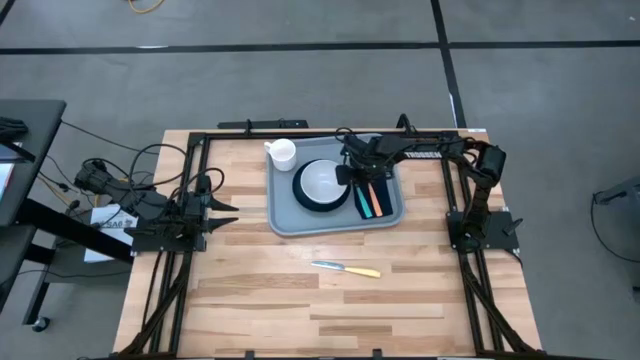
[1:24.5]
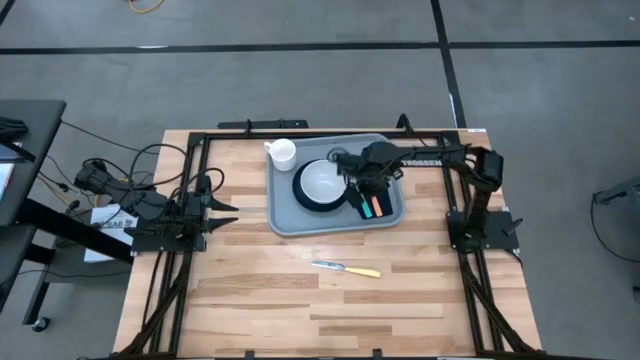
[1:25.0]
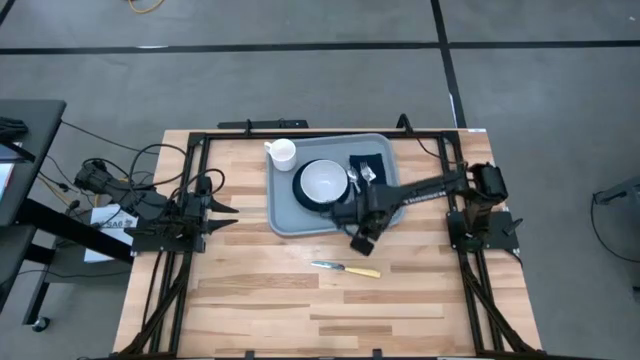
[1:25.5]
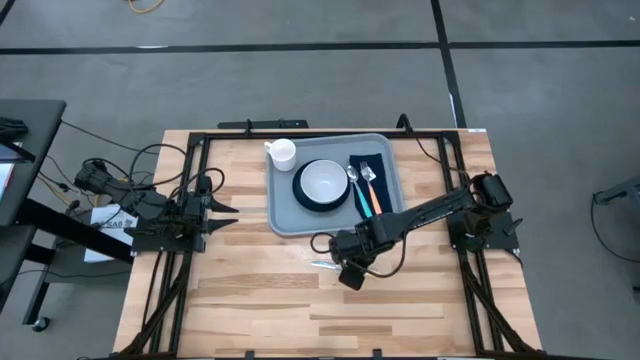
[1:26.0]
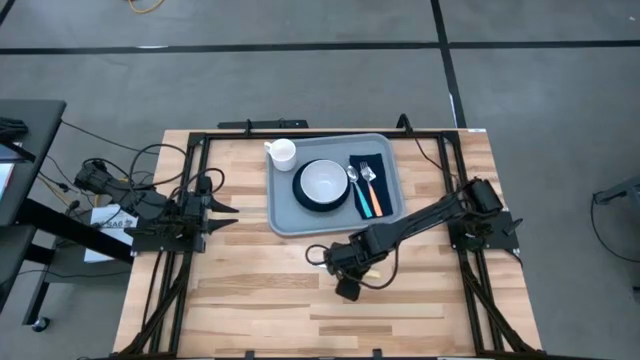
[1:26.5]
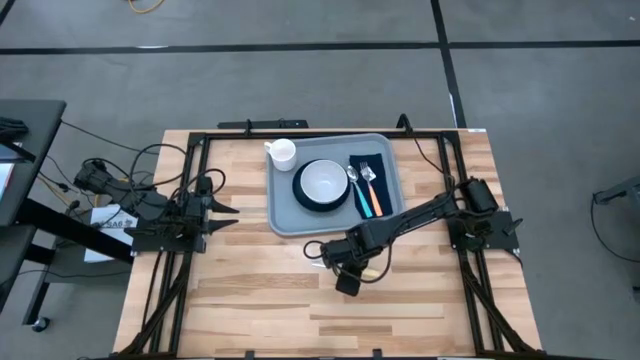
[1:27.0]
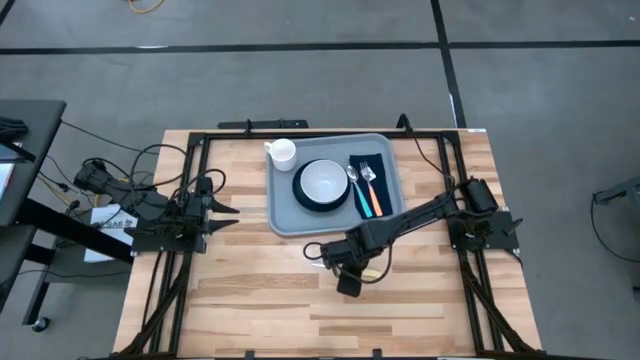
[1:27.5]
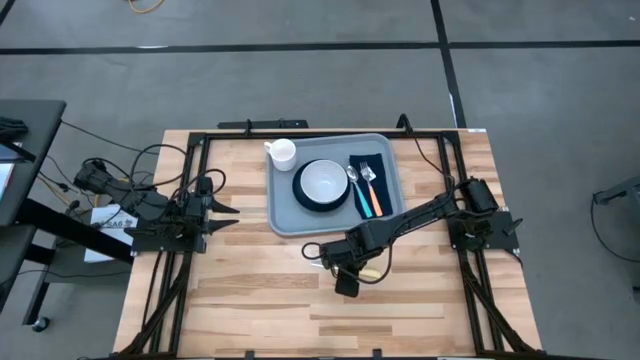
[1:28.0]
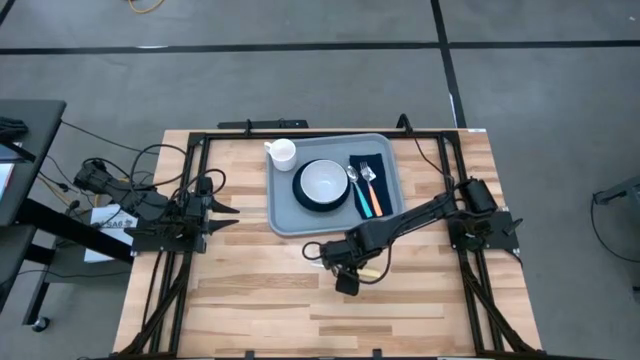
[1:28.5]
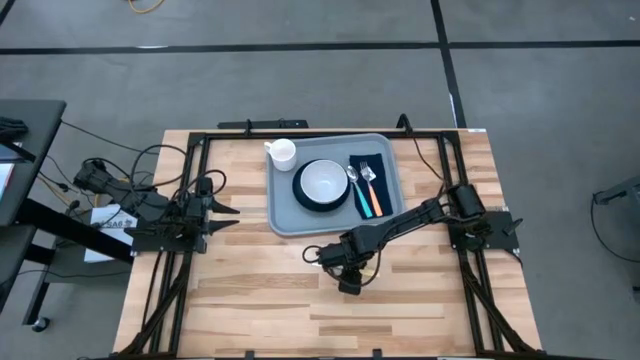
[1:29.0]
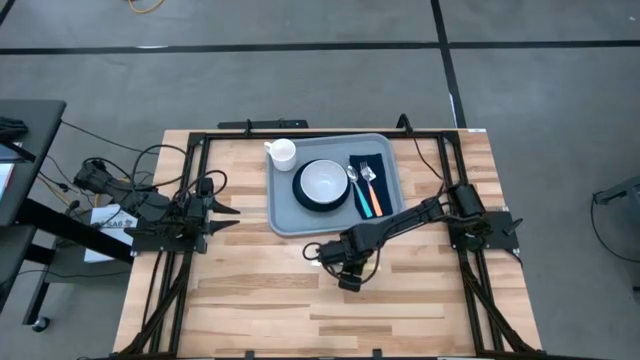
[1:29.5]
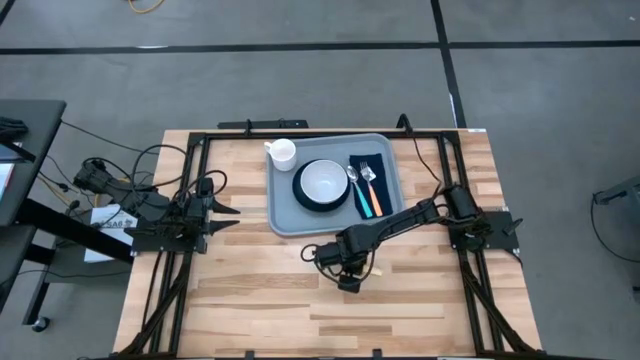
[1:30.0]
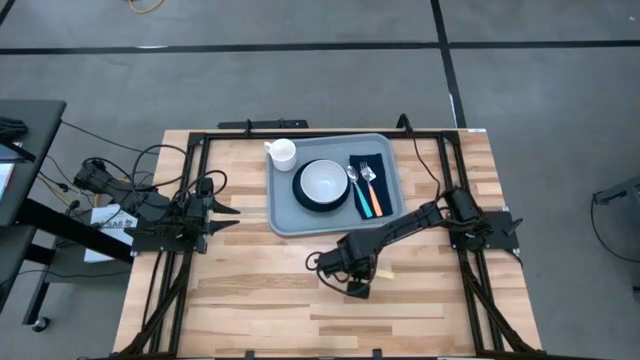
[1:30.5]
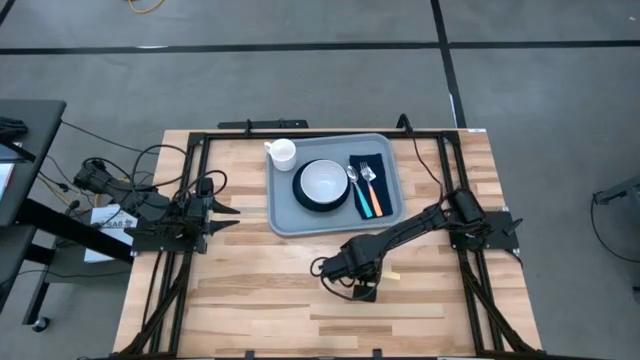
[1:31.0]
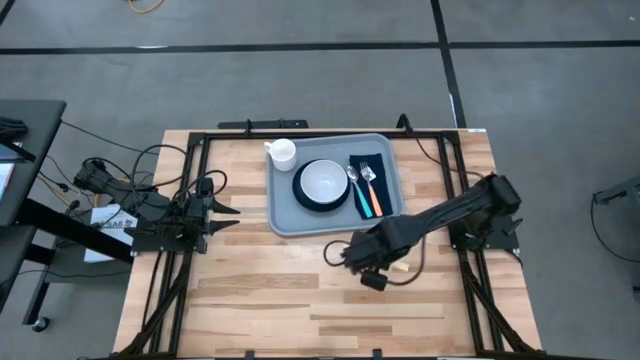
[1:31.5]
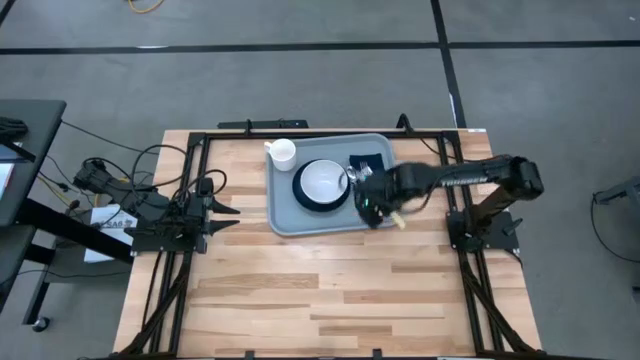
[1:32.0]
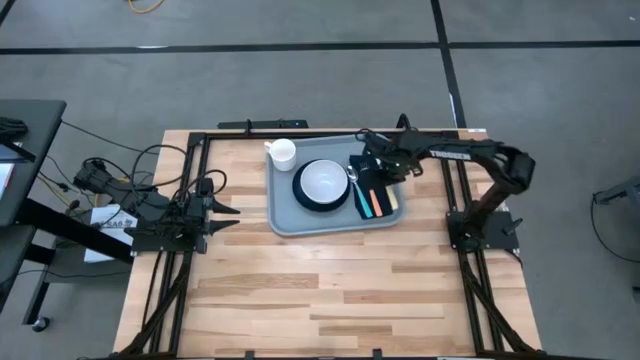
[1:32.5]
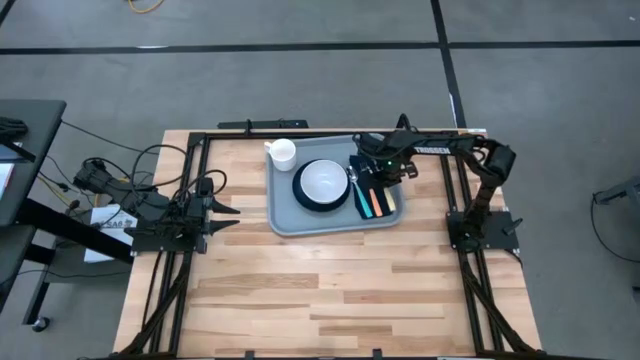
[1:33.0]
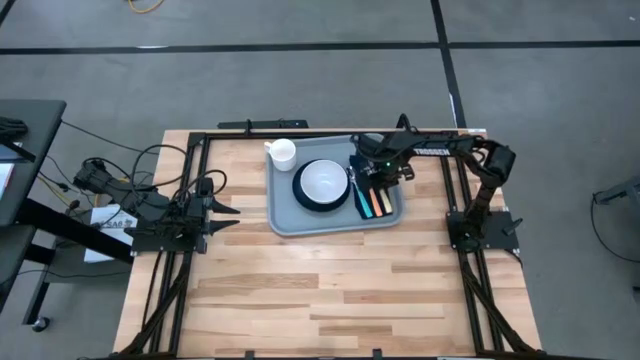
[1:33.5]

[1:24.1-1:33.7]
Task: Set up tray
Put the yellow knife on the dark blue napkin to the right of the orange fork

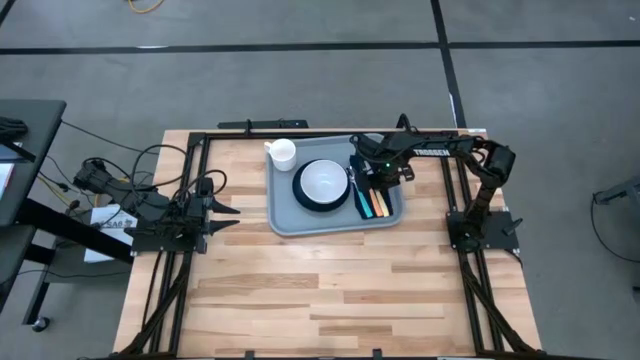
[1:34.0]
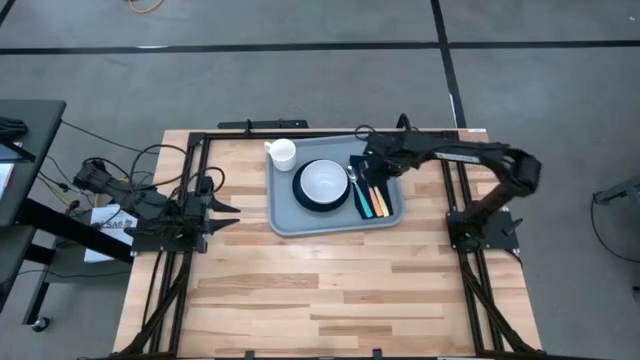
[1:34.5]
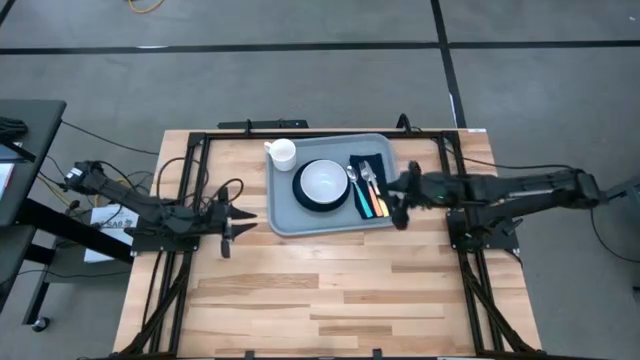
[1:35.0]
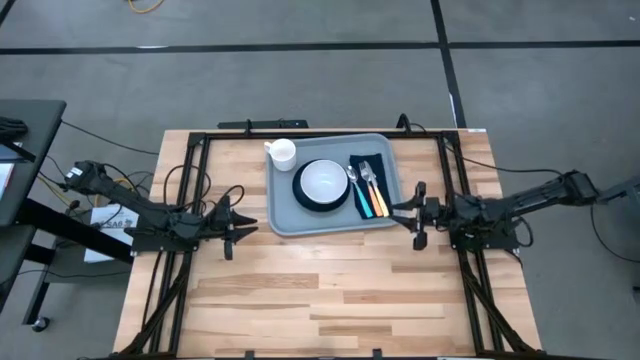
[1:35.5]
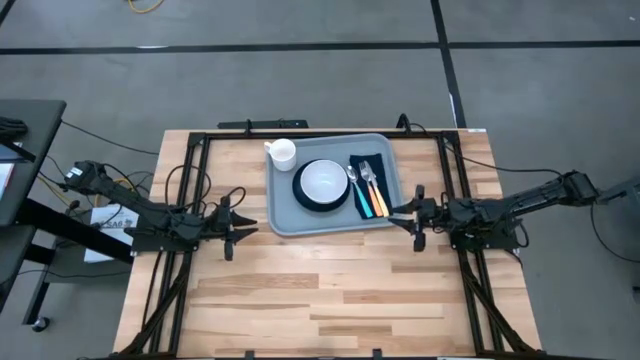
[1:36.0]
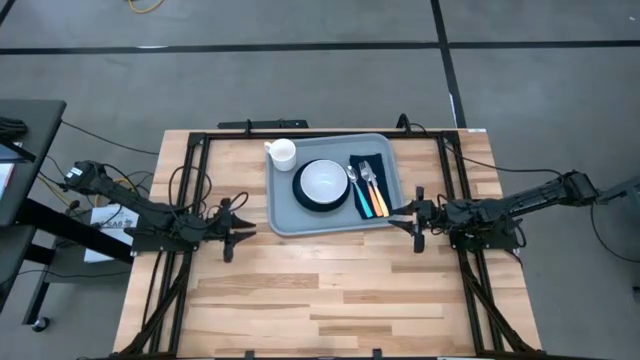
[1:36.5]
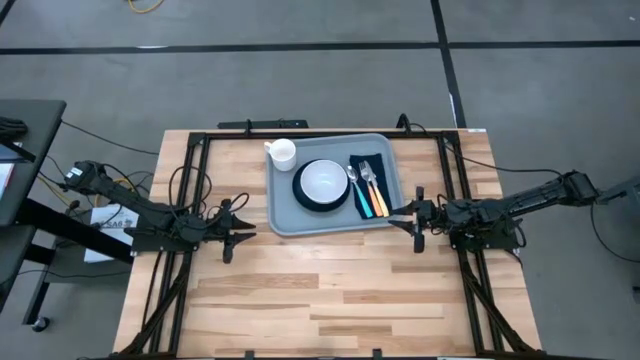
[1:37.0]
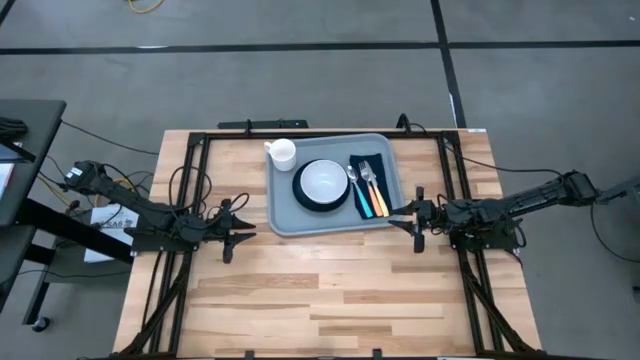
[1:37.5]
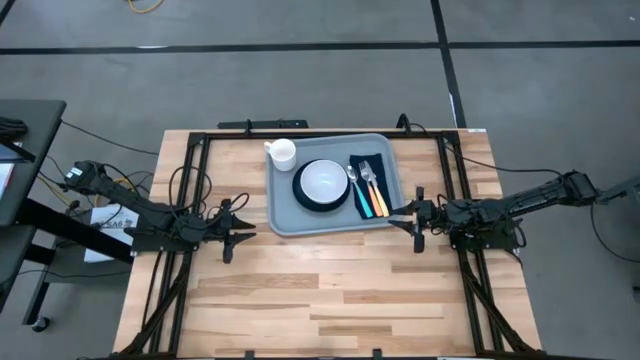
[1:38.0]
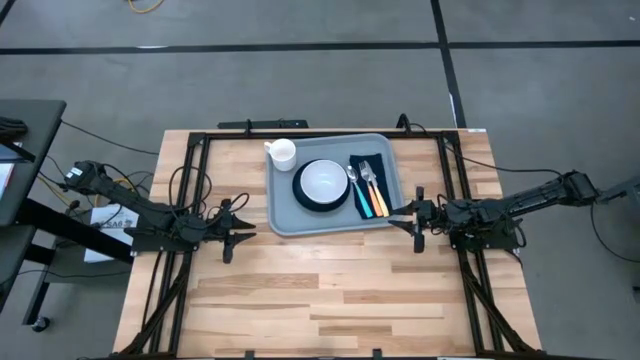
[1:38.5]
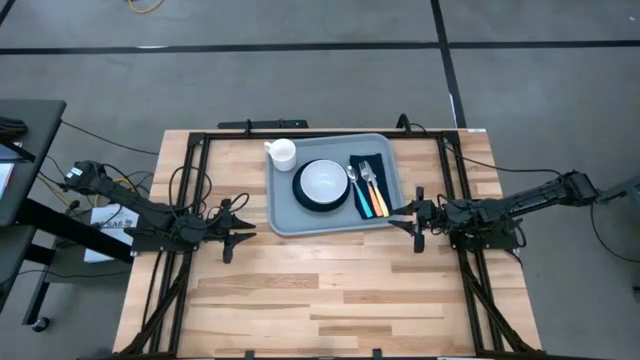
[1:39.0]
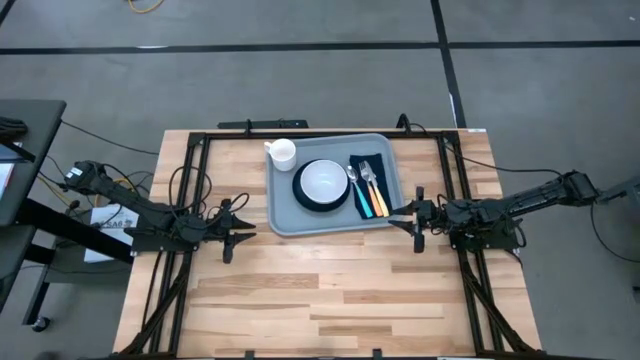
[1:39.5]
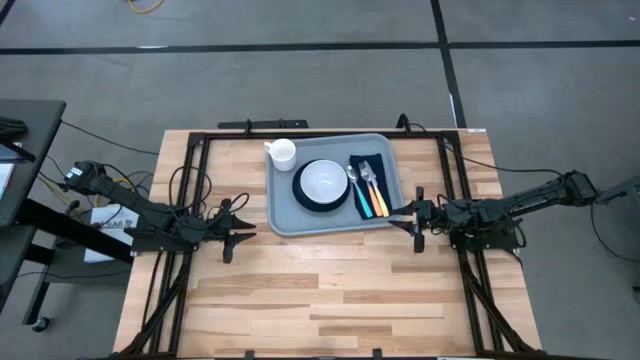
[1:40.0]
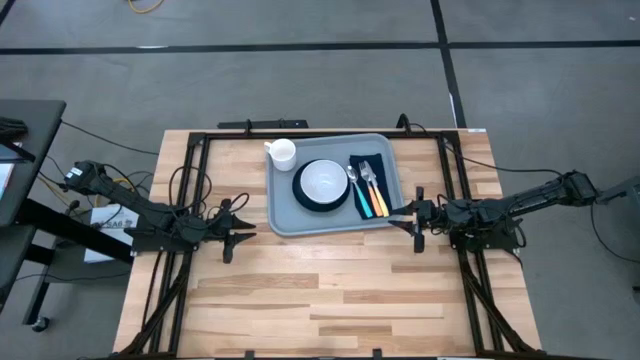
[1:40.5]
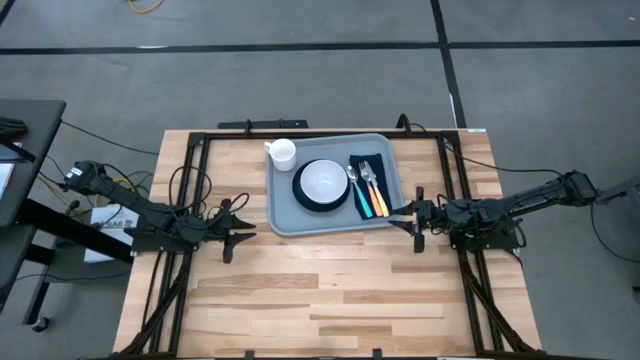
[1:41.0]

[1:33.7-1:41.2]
Return to Home Position
